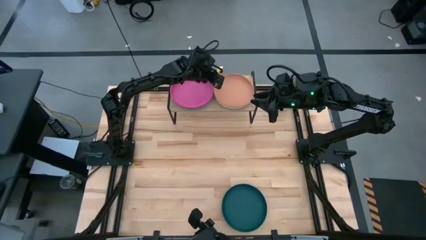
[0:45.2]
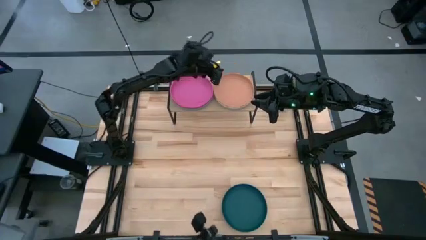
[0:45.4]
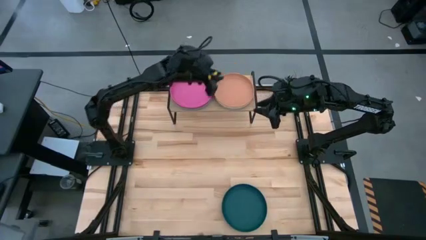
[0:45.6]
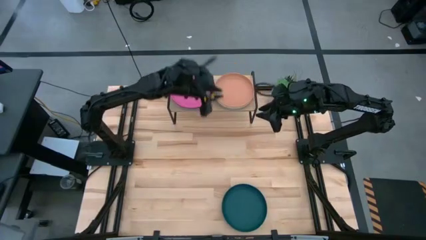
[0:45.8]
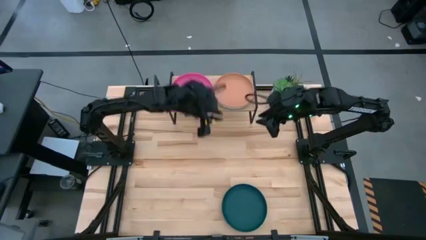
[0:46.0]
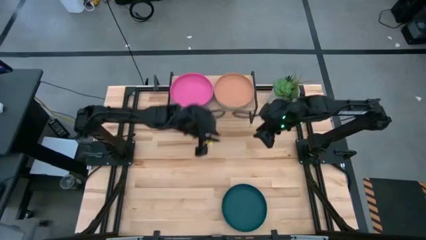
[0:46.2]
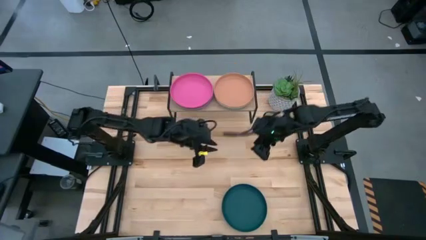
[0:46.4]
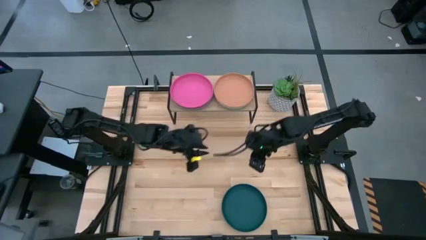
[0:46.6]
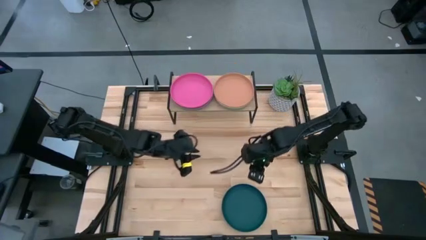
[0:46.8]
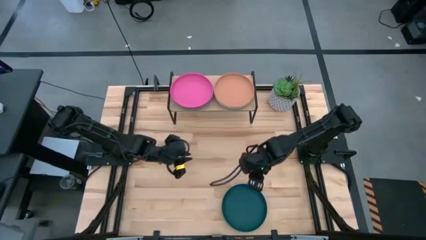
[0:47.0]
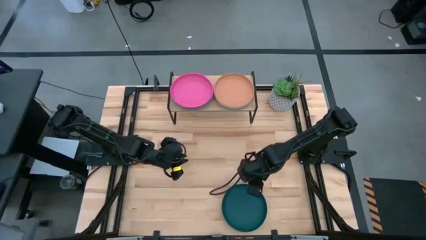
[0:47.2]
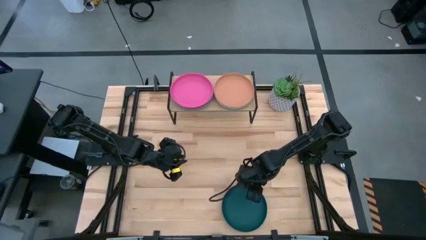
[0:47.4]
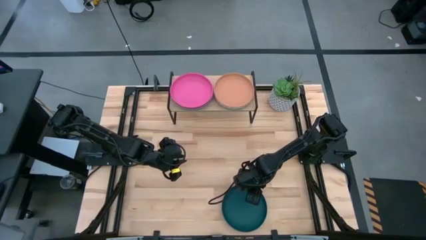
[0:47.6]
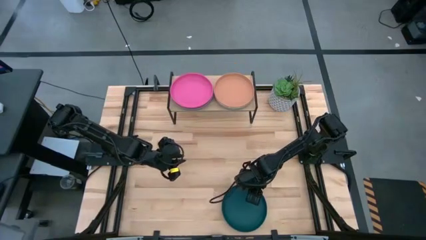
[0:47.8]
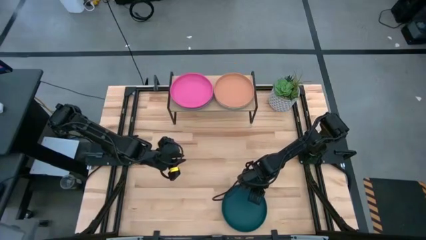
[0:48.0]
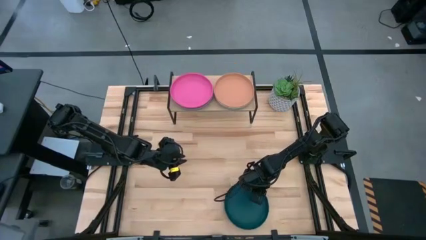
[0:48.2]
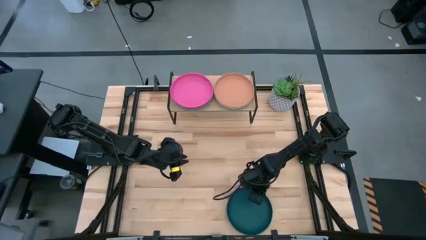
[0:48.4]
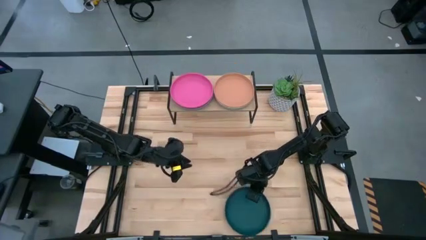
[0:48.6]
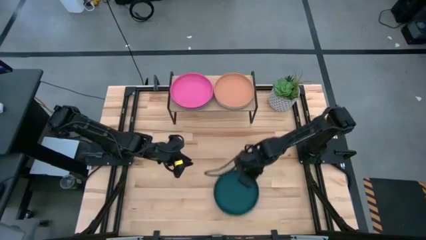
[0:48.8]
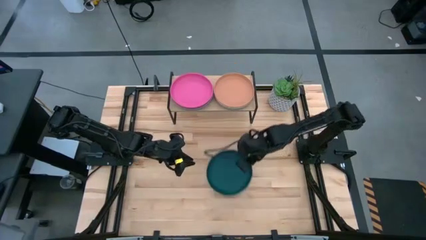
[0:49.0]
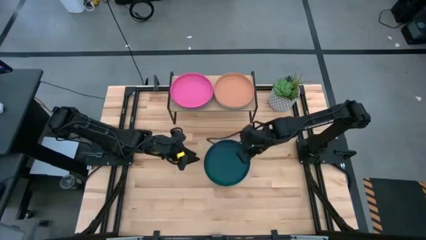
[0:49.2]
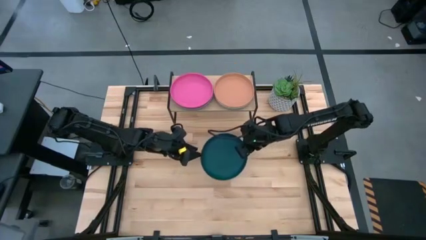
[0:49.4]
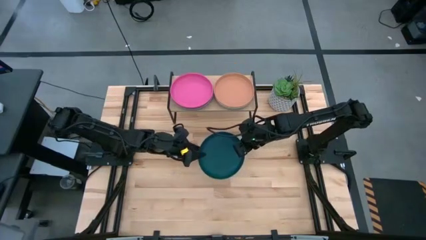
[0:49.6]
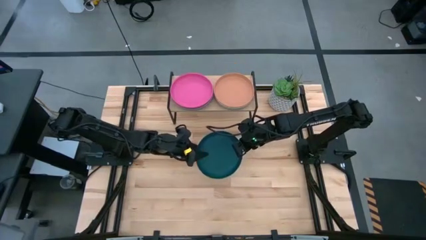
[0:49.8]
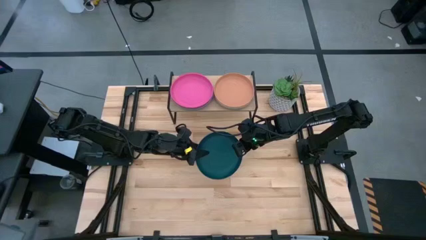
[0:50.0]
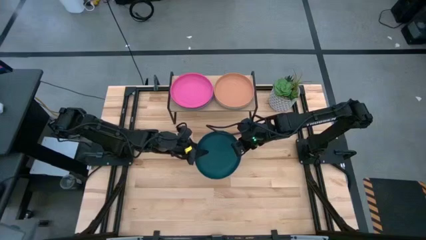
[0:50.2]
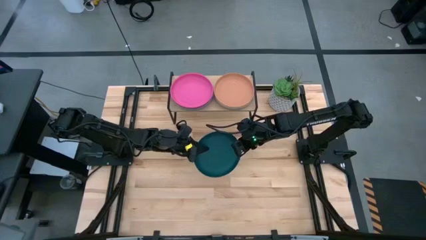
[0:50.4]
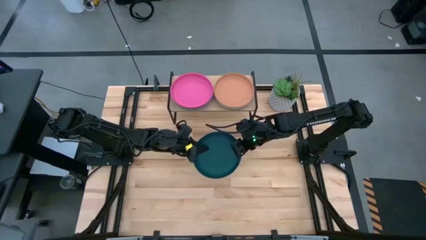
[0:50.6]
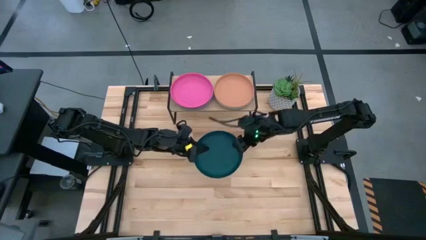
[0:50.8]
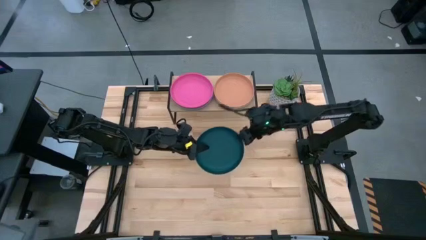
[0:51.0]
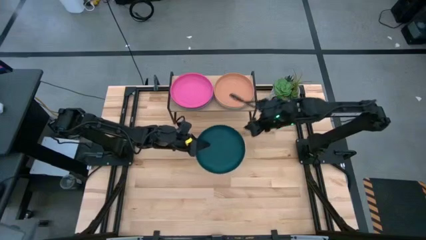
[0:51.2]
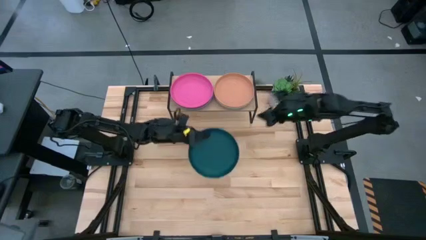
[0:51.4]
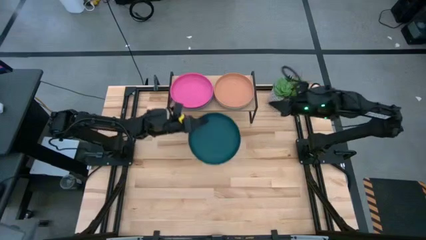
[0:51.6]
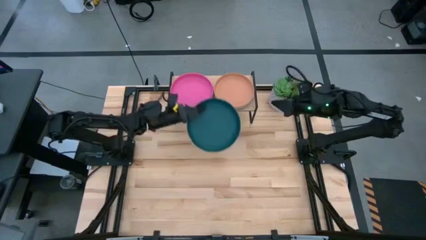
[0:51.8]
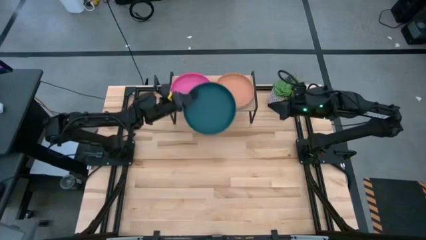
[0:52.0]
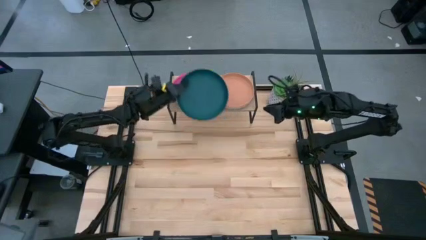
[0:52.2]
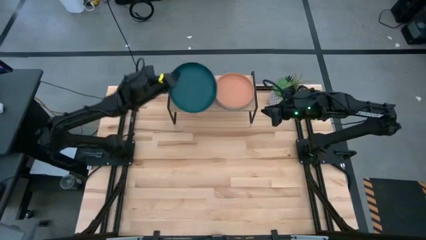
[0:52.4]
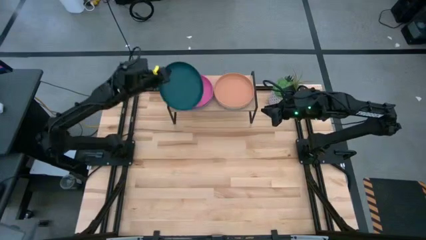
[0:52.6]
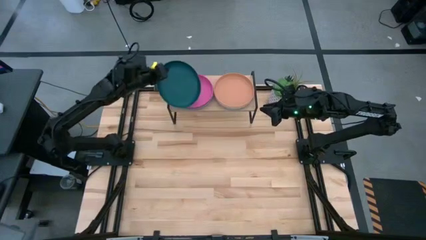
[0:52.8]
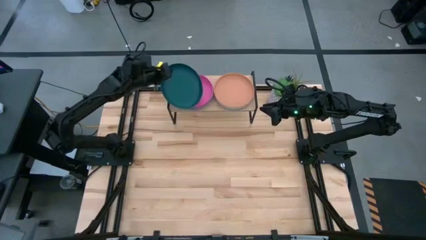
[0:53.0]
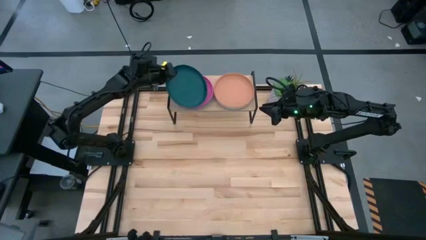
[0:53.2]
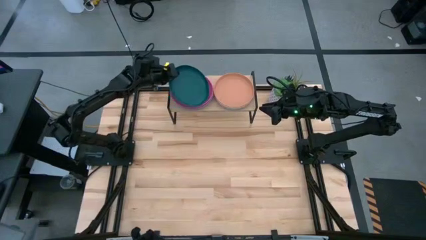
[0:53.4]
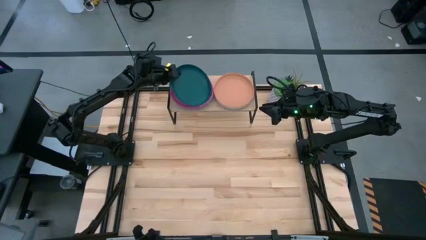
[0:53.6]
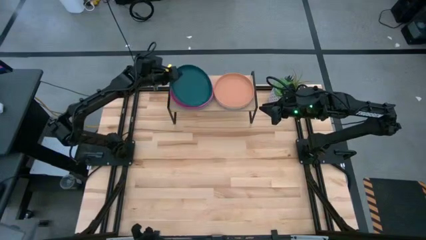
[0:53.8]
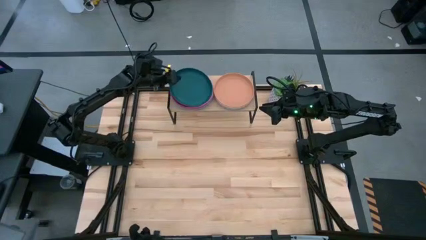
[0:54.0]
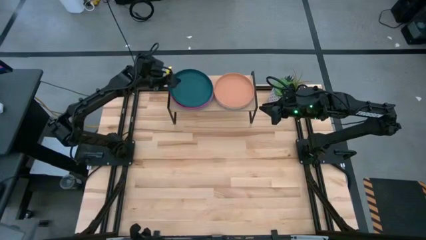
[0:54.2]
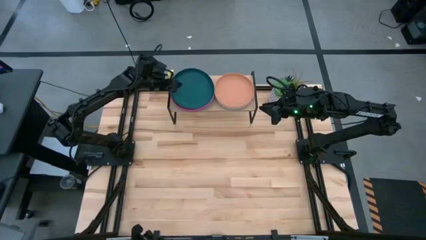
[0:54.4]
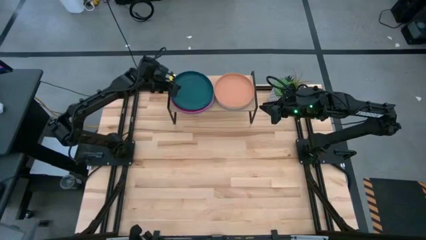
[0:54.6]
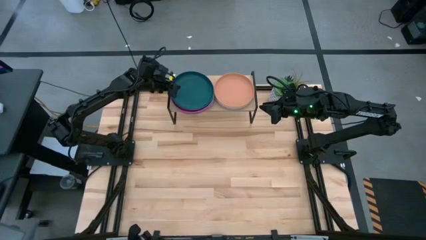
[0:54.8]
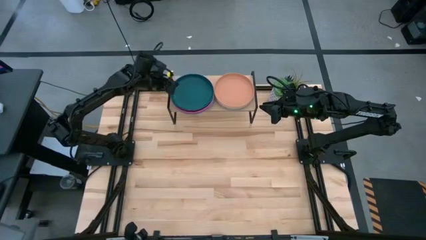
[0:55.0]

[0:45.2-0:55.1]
Task: Place and stack plates onto a shelf
Stack the dark blue plate on top of the pink plate on the shelf

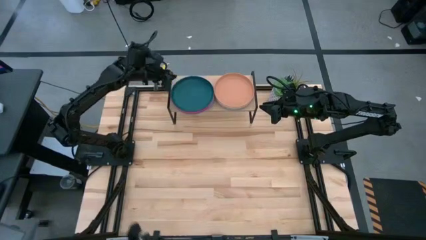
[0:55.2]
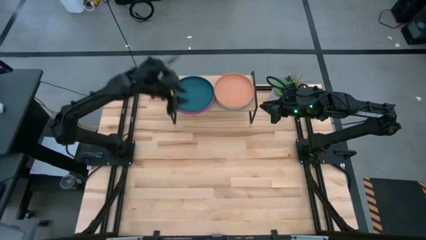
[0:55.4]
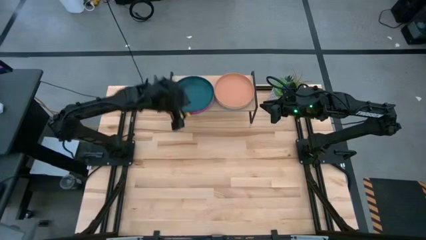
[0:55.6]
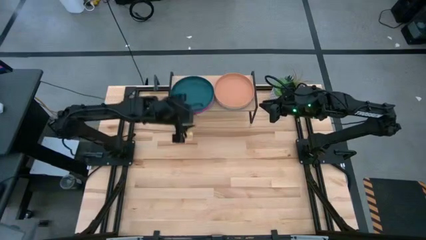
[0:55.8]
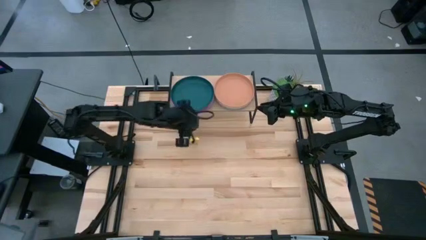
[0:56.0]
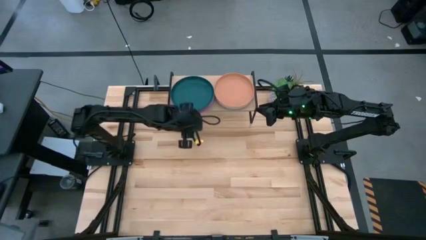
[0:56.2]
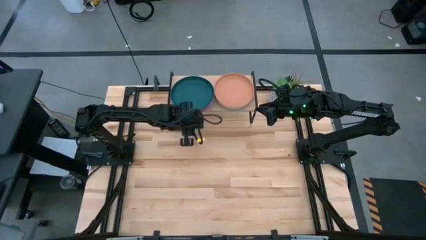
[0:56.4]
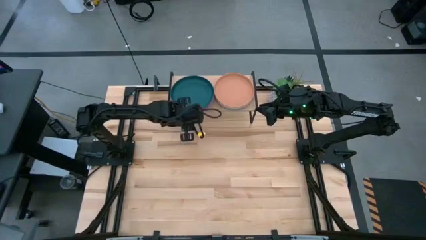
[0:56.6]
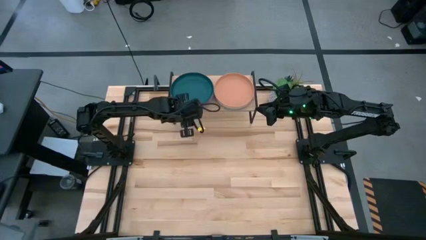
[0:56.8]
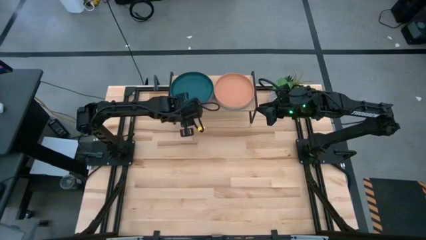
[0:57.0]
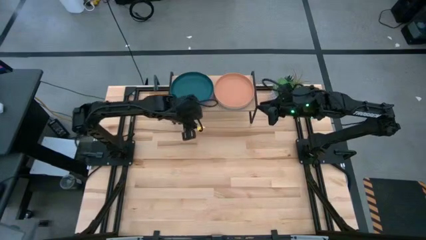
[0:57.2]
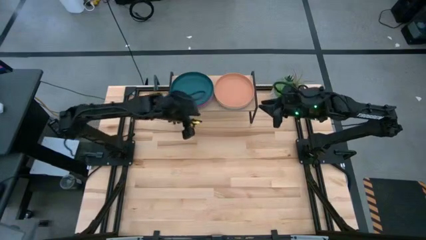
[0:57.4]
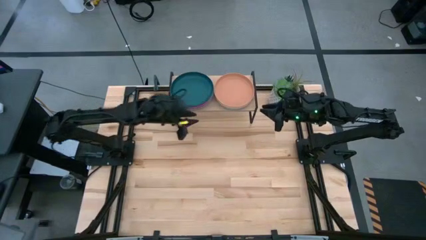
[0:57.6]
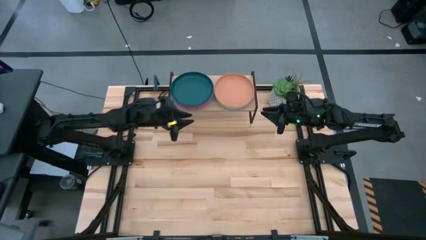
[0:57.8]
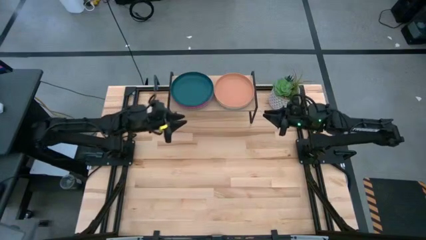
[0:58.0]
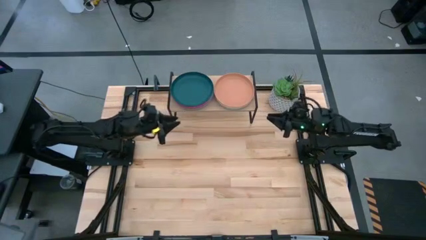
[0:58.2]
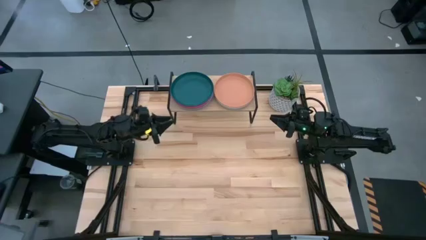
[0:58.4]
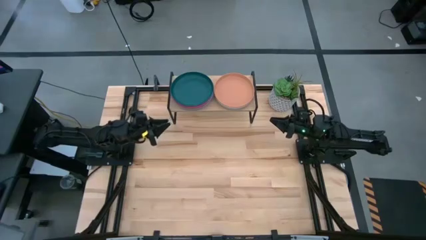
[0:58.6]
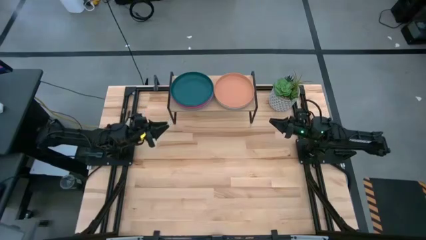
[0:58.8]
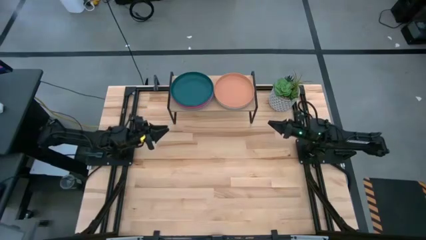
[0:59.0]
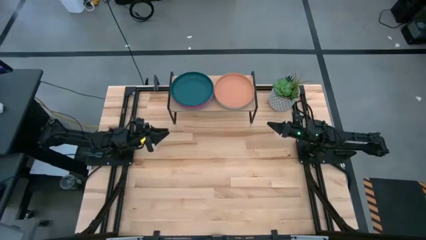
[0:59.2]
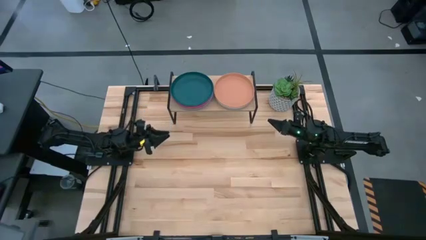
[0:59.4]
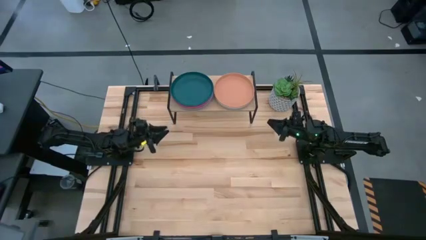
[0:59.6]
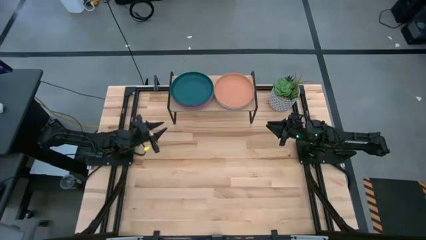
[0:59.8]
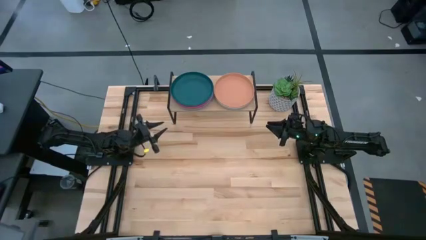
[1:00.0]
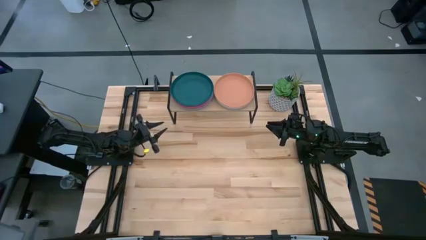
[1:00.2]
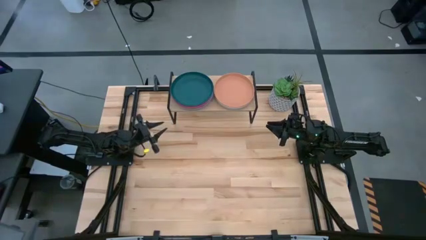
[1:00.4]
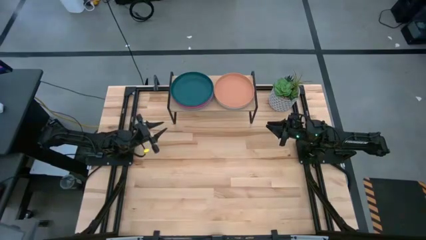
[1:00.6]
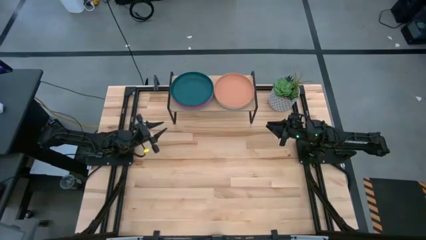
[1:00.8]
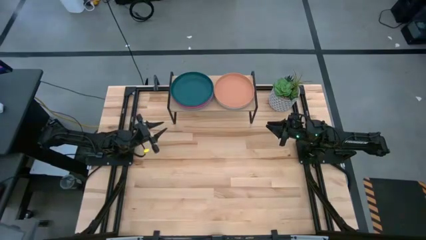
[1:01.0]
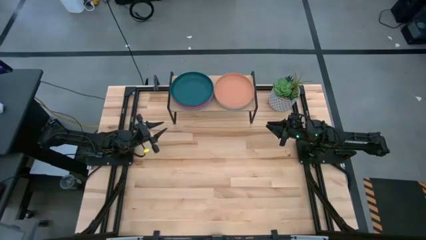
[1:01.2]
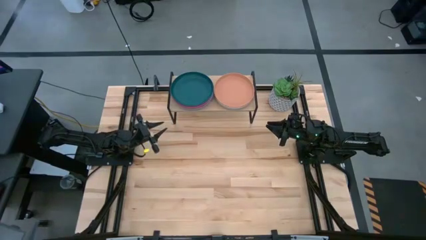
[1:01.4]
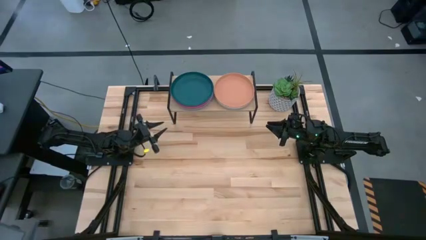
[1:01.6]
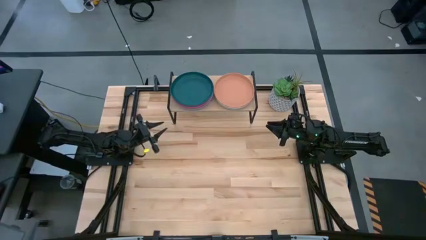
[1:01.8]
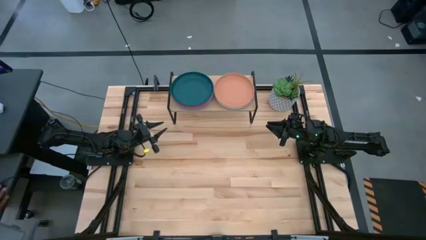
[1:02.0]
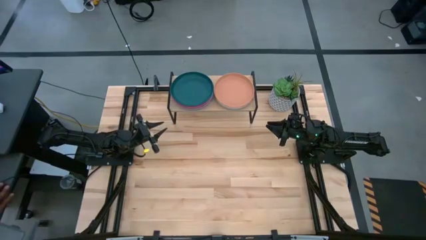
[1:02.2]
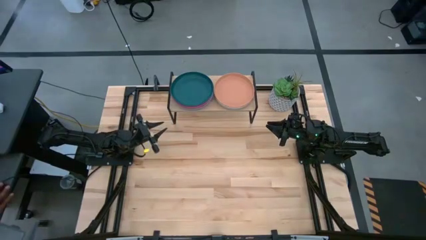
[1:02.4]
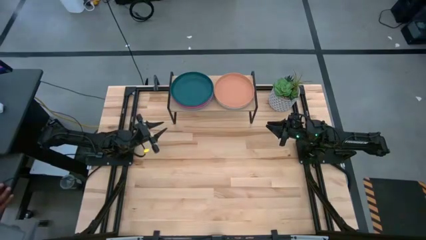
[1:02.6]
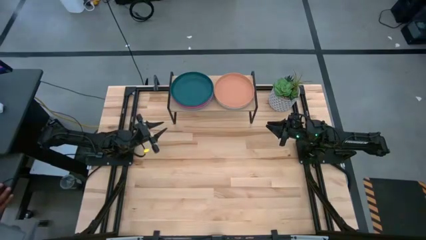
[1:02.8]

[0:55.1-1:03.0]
Return to Home Position
